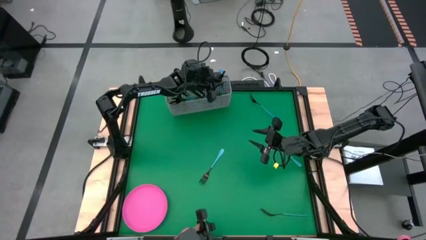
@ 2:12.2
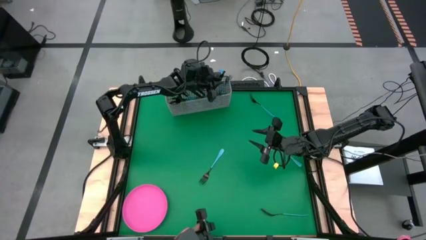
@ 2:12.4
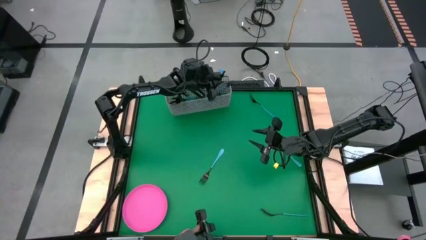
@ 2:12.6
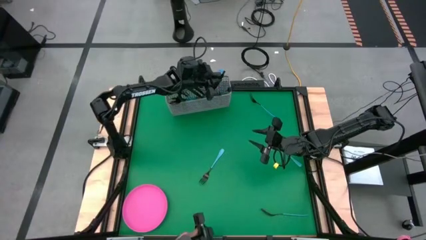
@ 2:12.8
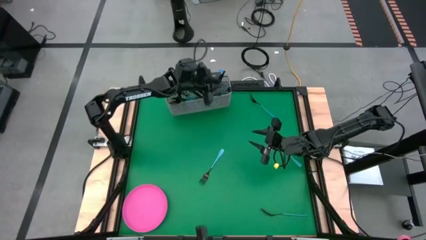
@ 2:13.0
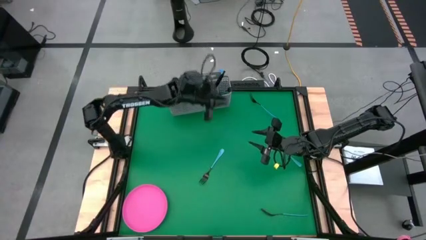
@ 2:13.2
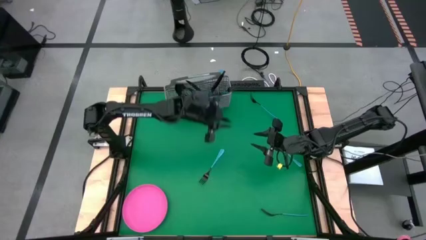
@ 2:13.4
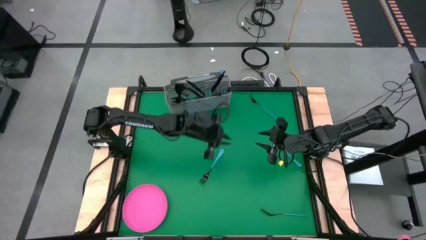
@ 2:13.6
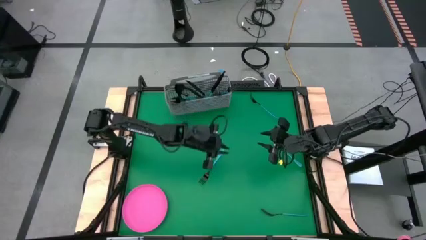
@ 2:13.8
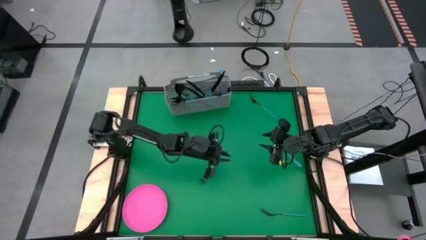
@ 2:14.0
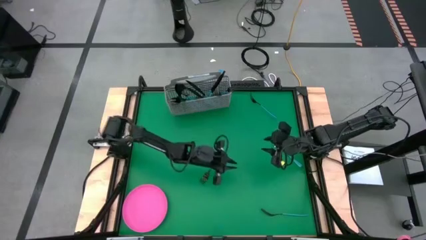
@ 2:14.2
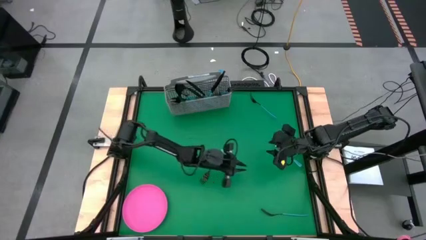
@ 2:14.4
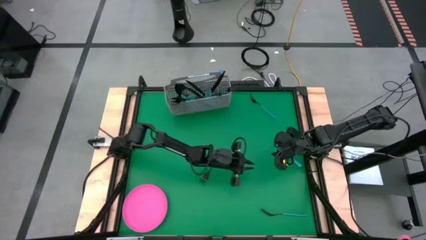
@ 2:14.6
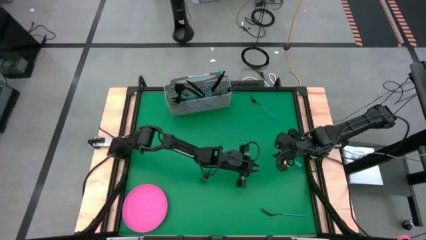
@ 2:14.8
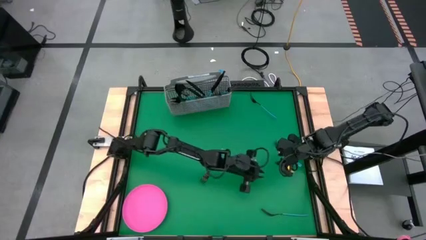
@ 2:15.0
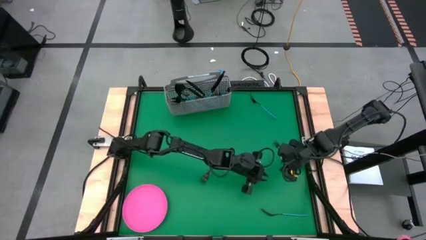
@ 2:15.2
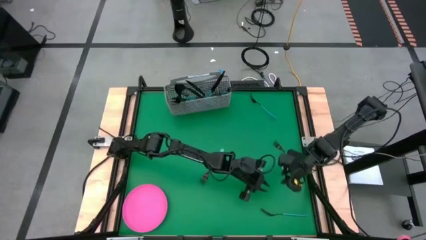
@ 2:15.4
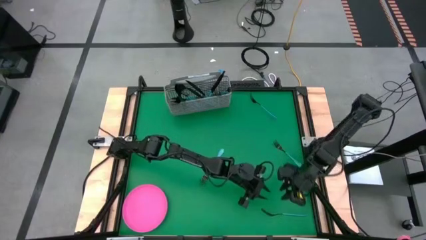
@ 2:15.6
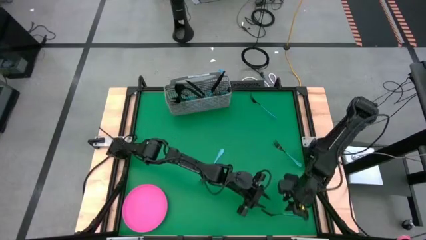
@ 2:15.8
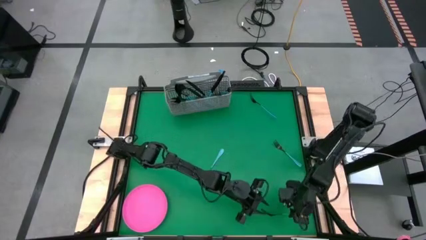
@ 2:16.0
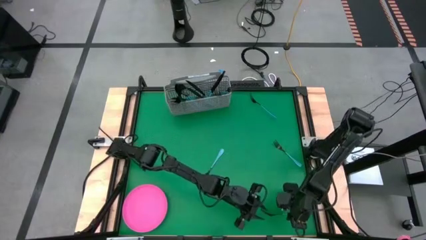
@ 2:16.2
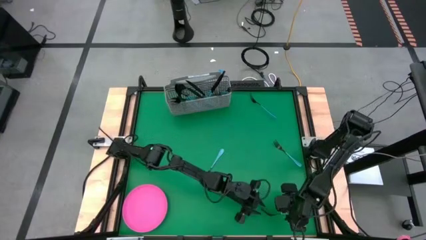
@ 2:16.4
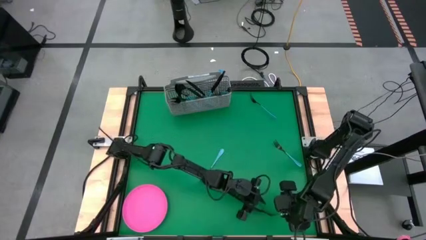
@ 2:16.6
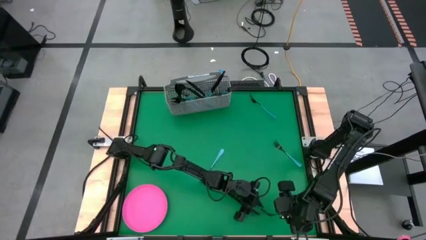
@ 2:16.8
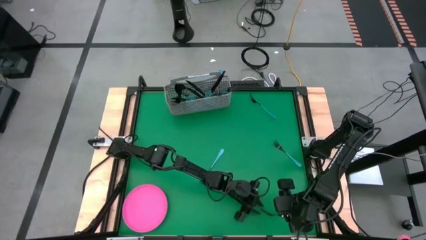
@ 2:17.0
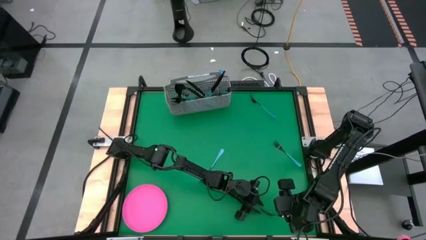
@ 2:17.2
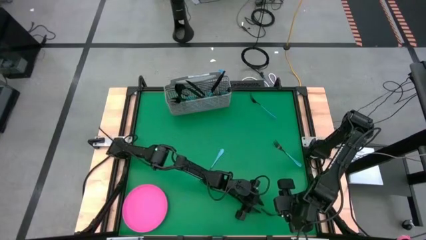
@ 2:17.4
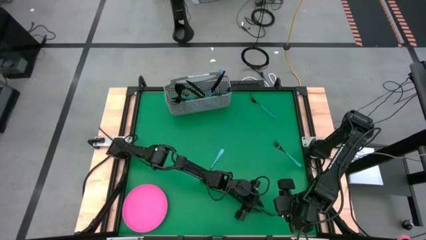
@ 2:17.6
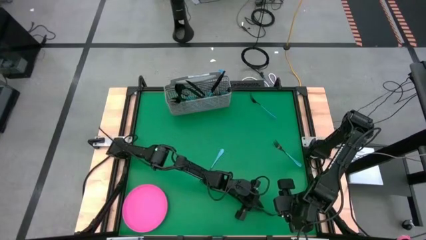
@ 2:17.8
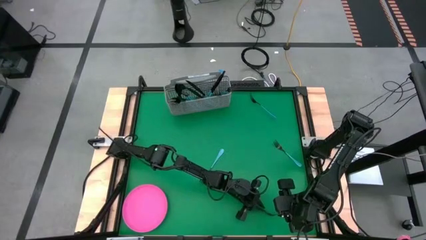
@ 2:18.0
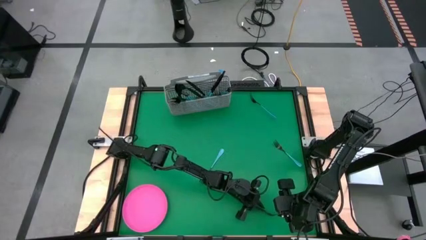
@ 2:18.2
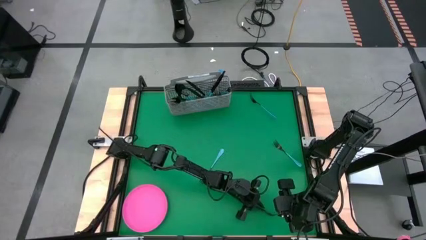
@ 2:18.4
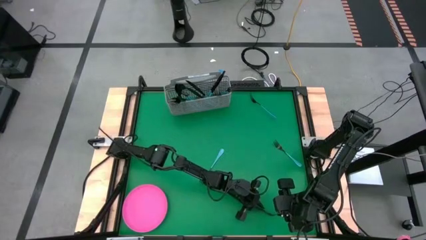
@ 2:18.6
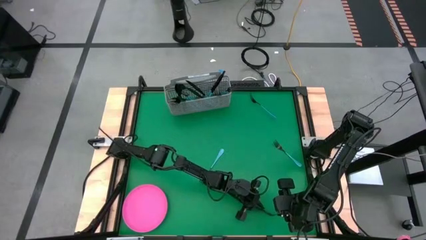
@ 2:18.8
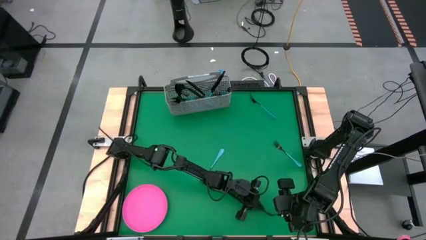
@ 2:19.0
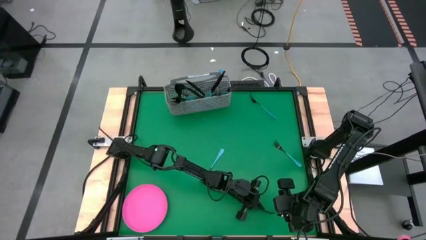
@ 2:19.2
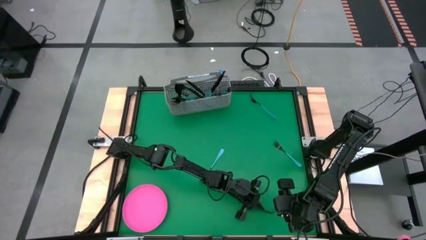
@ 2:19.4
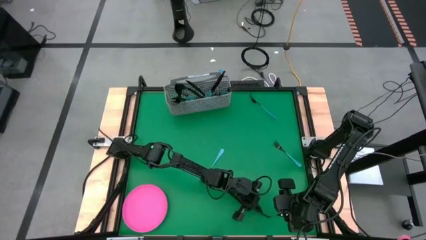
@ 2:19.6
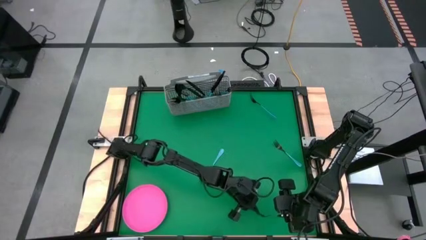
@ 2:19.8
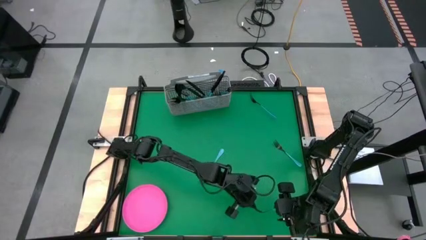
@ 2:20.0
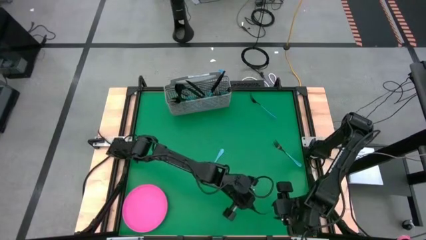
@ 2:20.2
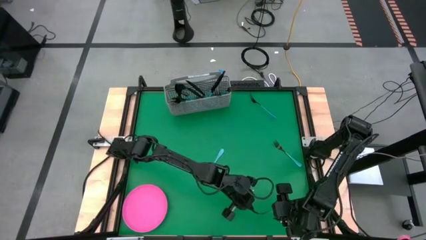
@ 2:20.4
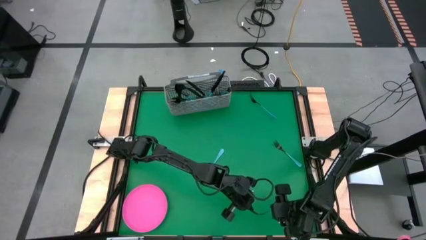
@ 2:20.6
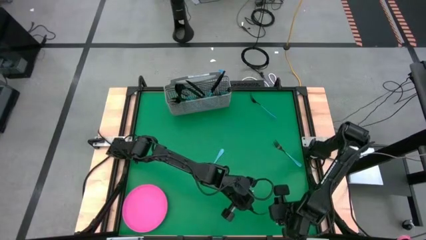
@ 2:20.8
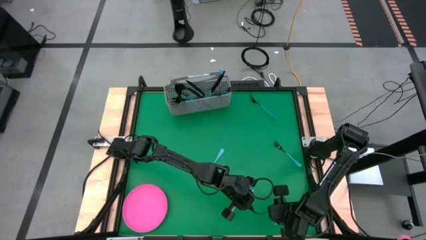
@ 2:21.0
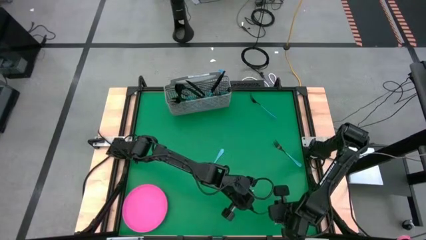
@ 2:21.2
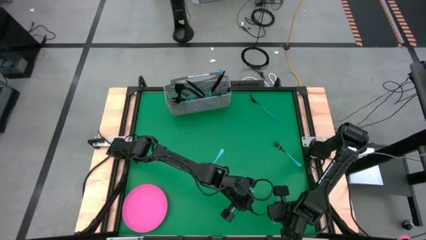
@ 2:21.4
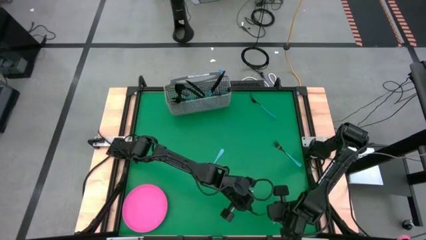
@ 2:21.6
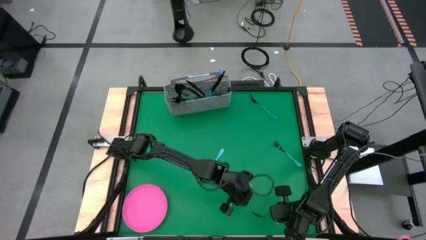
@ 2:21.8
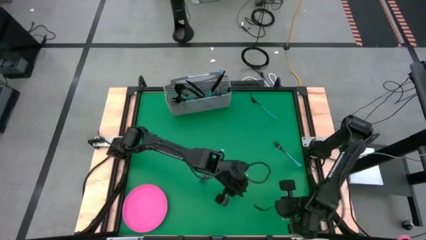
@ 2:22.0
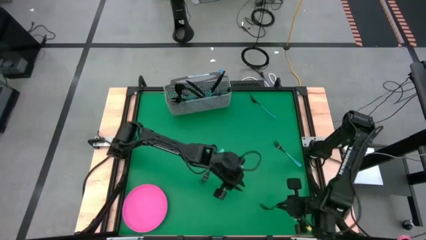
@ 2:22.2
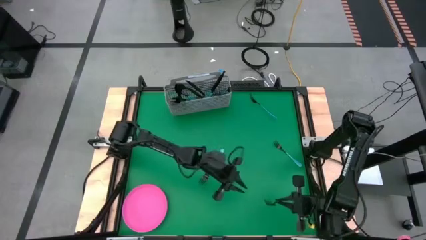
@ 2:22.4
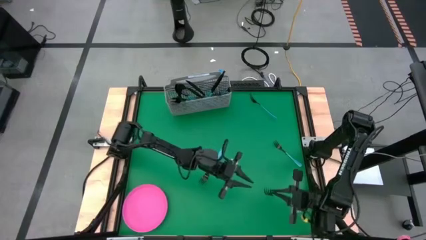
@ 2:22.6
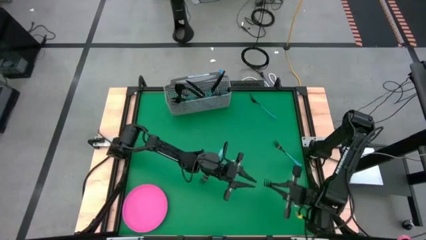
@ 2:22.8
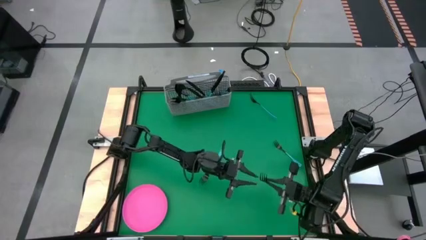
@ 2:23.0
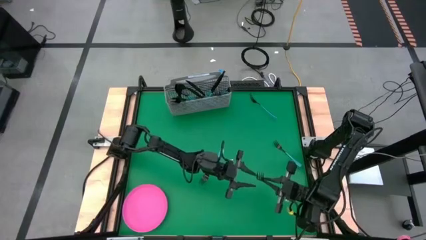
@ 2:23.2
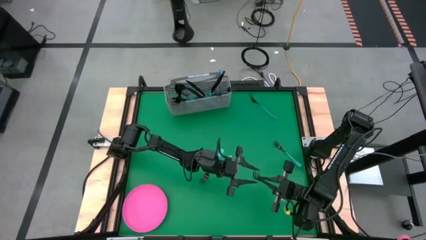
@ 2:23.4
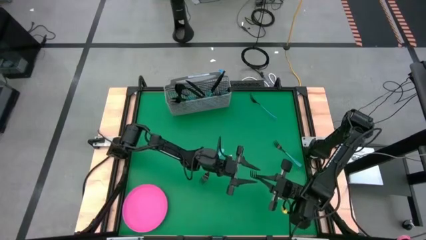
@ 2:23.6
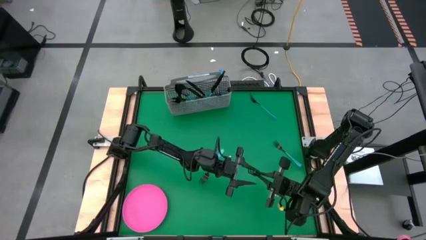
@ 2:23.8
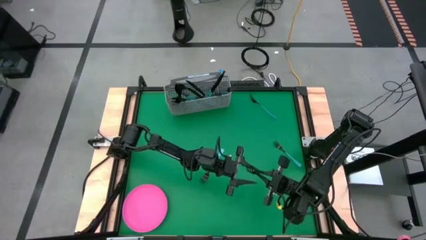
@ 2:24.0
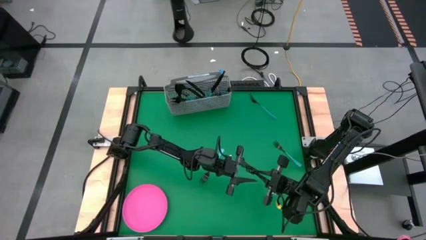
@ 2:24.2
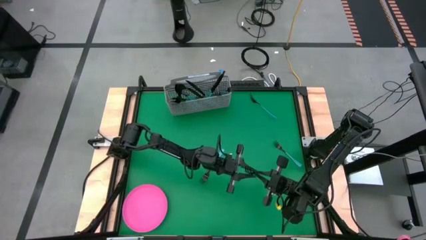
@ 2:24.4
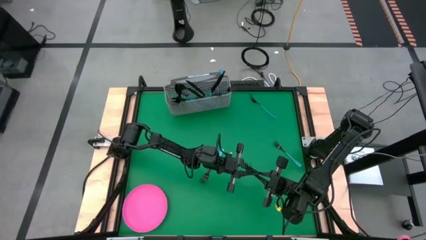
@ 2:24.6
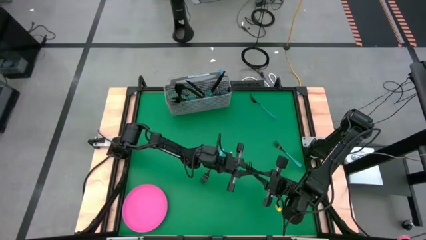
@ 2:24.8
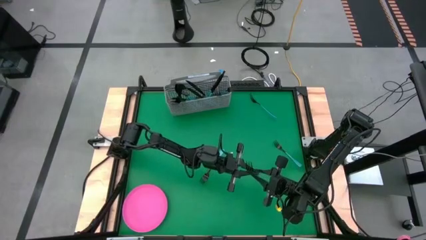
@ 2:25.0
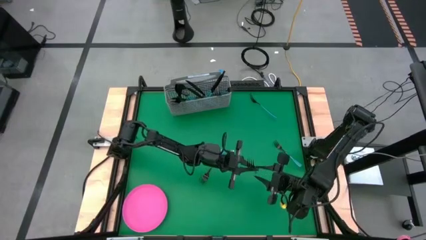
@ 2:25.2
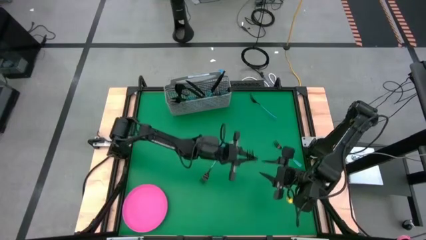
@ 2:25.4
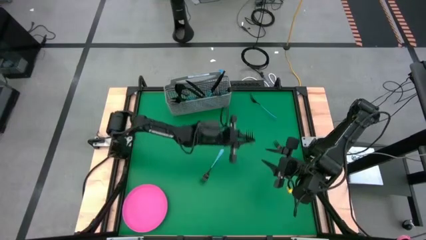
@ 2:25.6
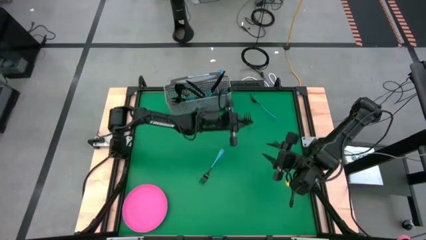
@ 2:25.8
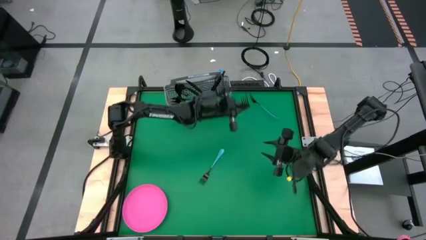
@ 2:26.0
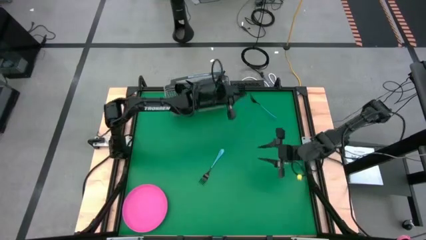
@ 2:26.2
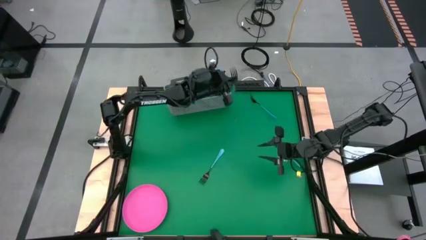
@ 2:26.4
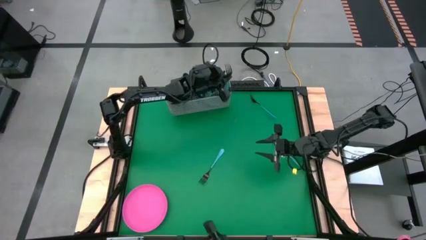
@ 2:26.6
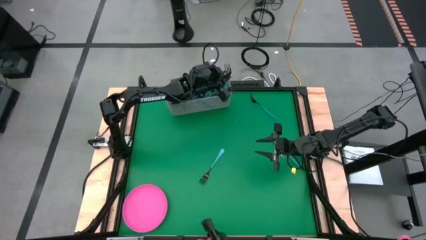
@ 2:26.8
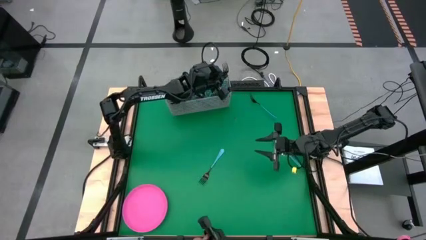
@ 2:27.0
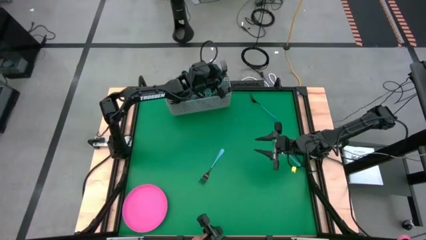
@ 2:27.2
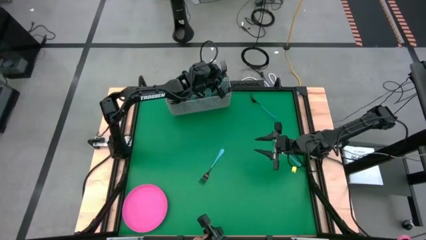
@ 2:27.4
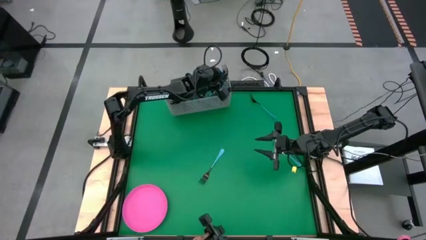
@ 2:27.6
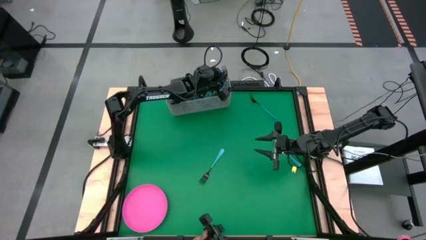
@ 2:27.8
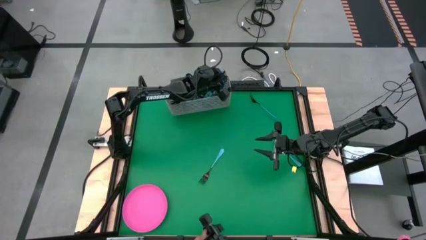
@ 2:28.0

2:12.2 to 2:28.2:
Task: Sort silverware
Put the blue fork into the silverware basket
